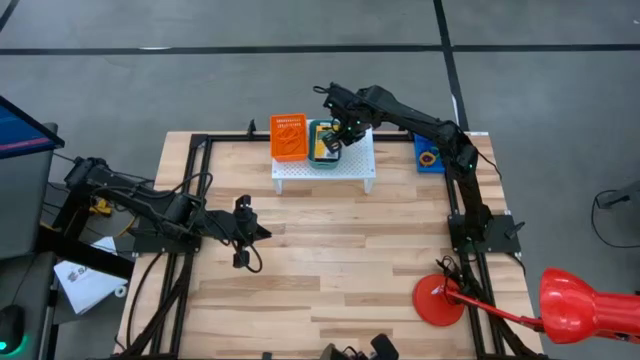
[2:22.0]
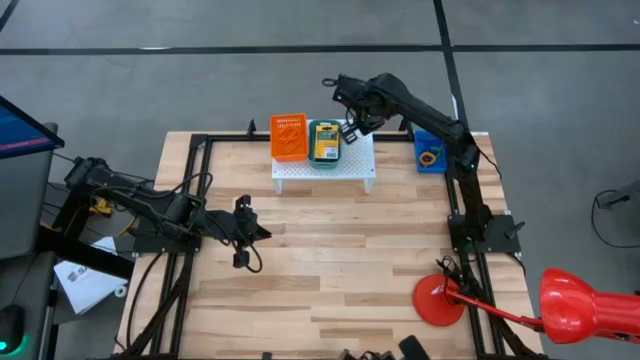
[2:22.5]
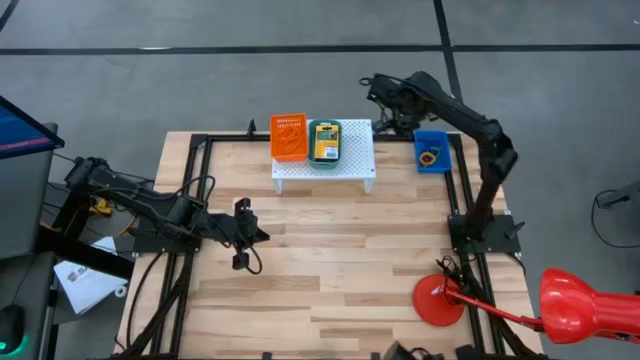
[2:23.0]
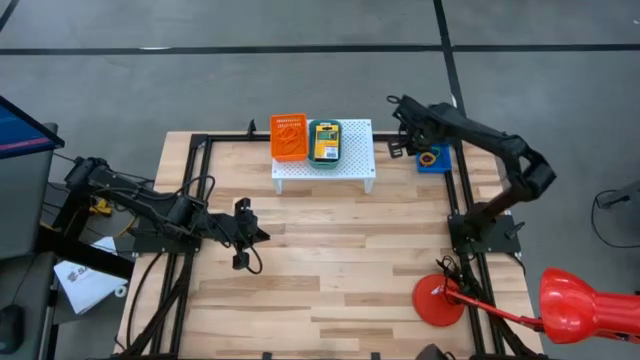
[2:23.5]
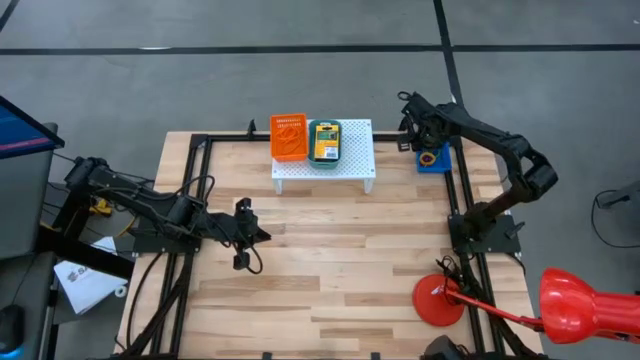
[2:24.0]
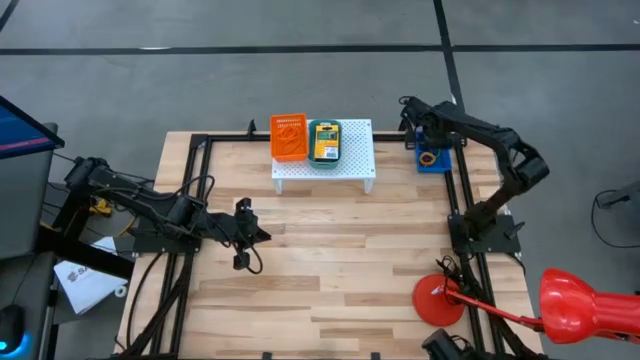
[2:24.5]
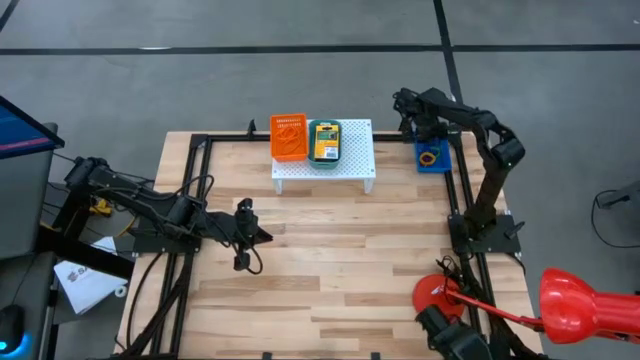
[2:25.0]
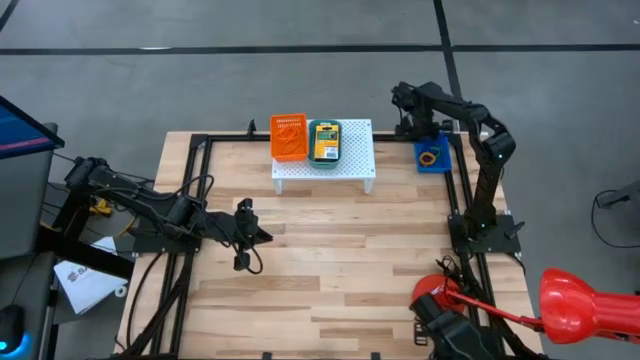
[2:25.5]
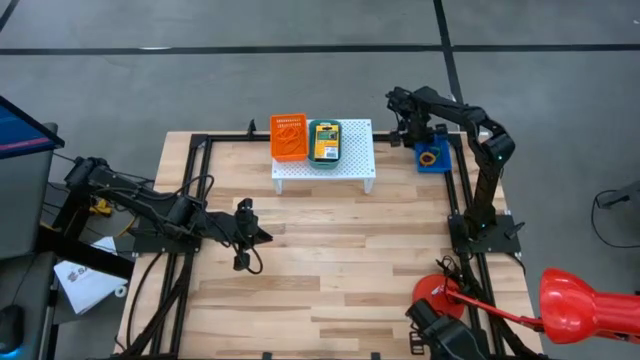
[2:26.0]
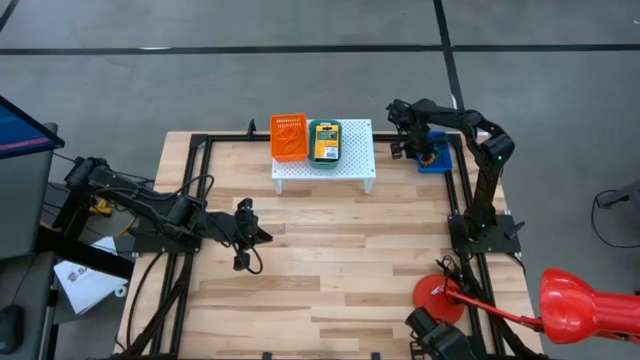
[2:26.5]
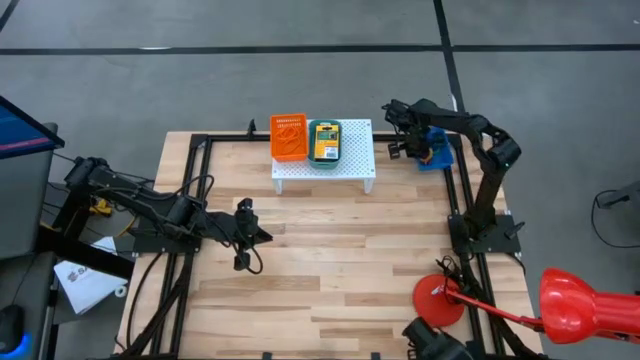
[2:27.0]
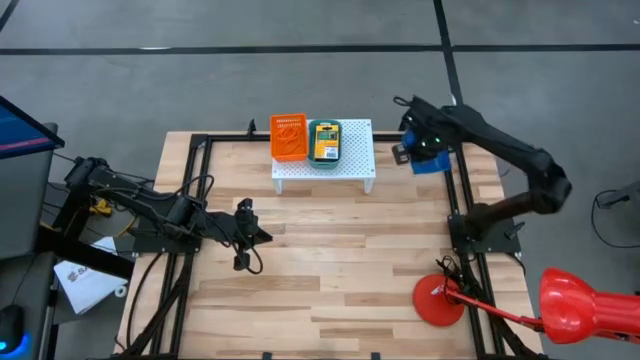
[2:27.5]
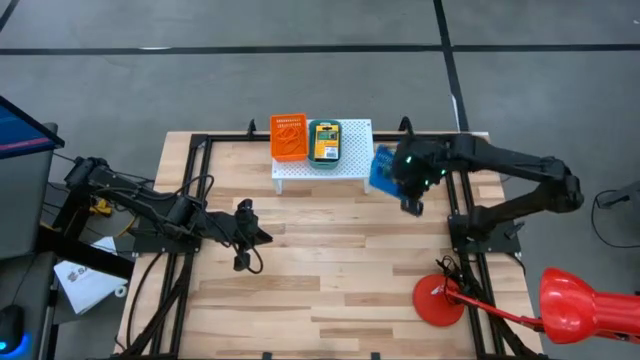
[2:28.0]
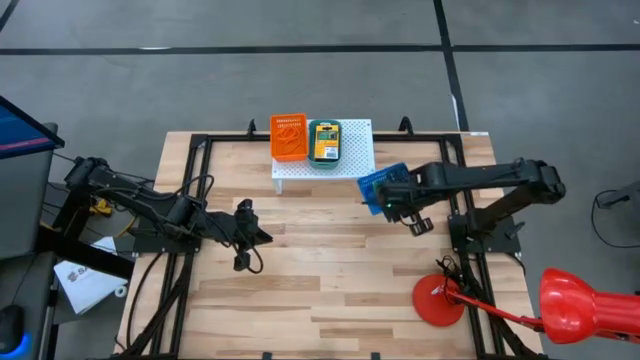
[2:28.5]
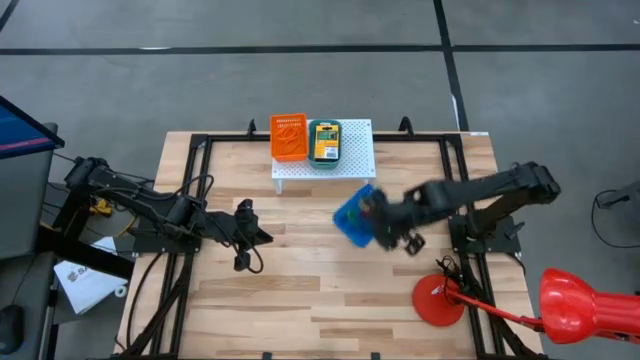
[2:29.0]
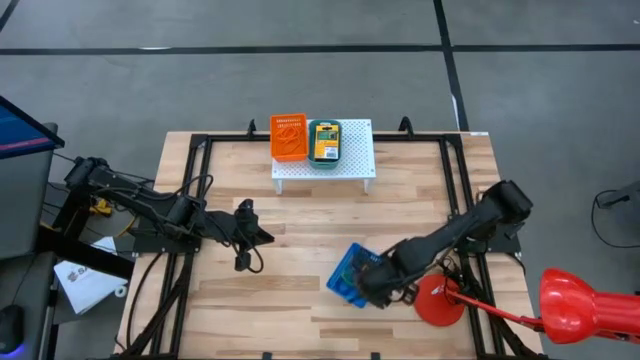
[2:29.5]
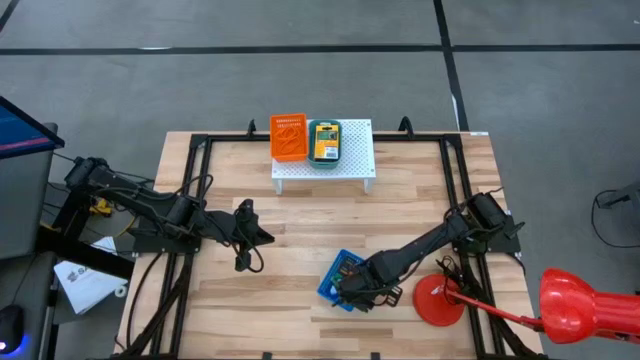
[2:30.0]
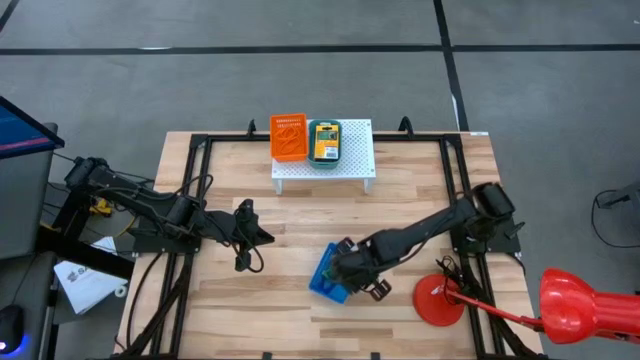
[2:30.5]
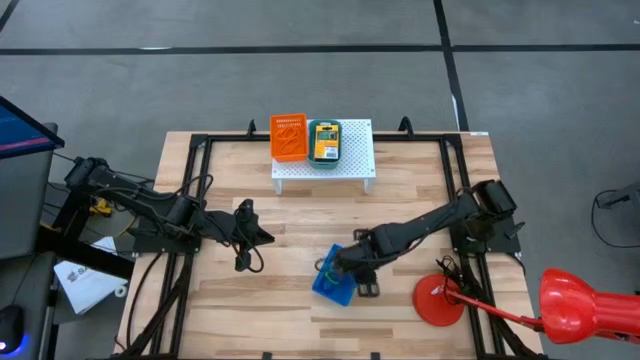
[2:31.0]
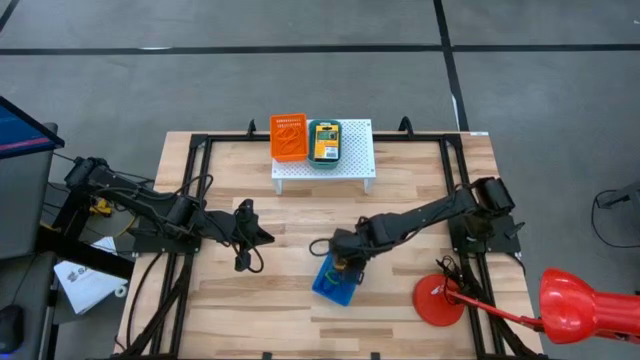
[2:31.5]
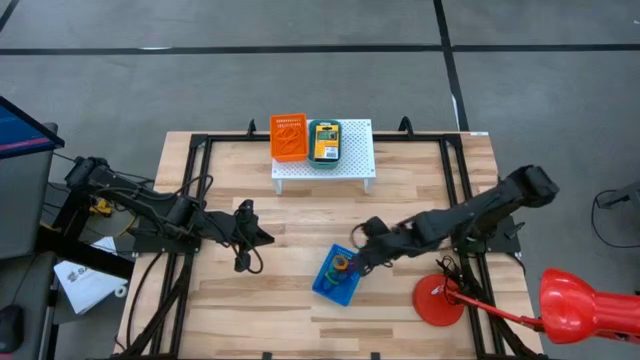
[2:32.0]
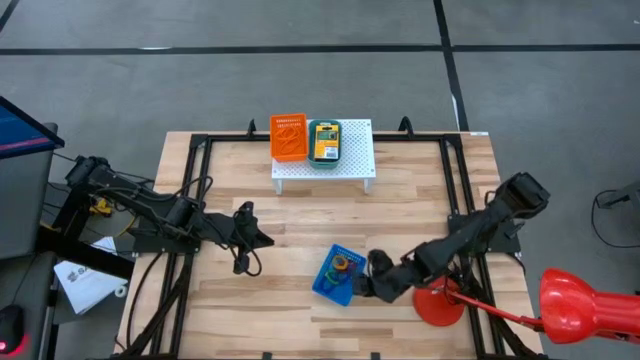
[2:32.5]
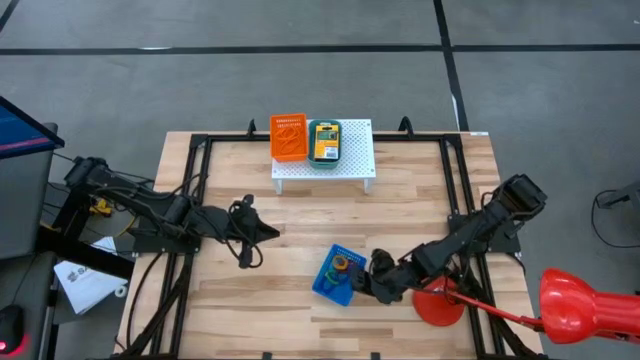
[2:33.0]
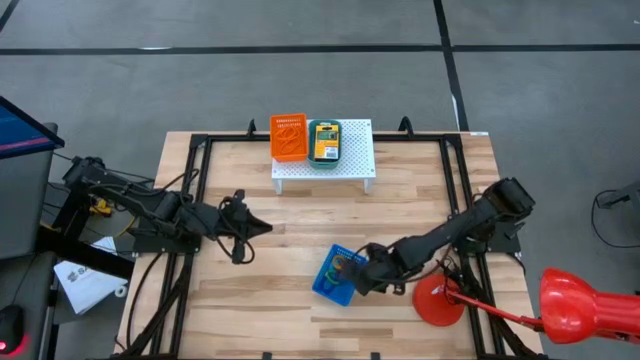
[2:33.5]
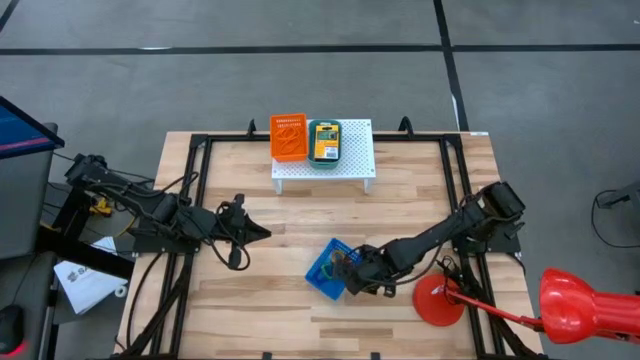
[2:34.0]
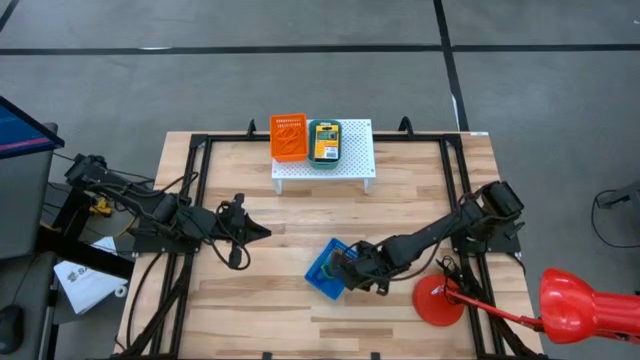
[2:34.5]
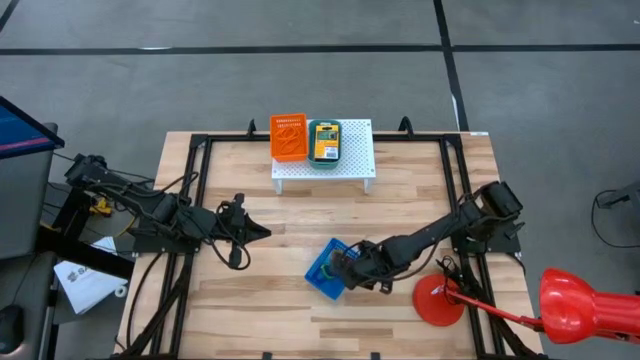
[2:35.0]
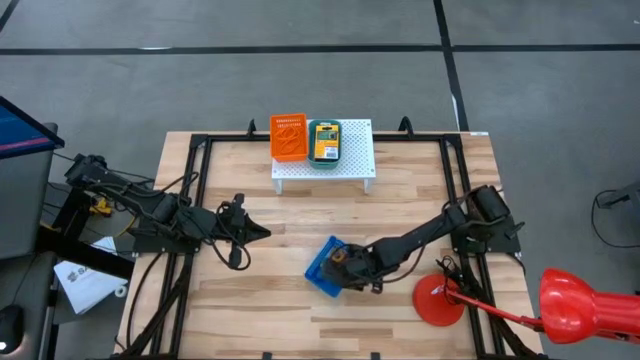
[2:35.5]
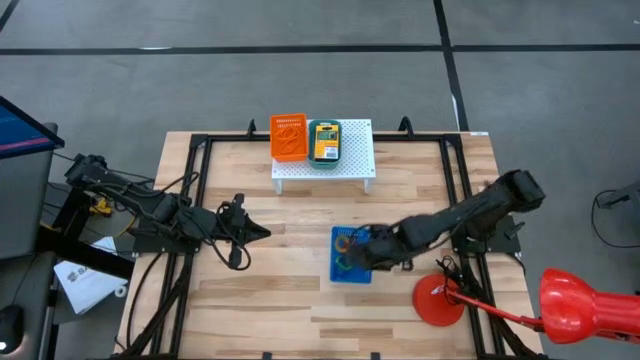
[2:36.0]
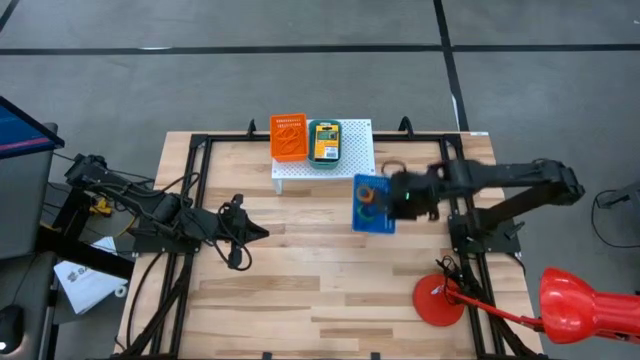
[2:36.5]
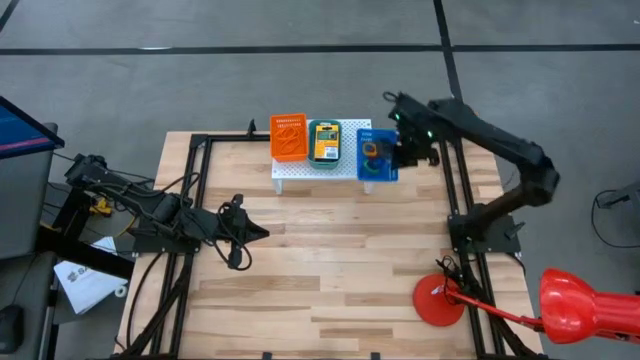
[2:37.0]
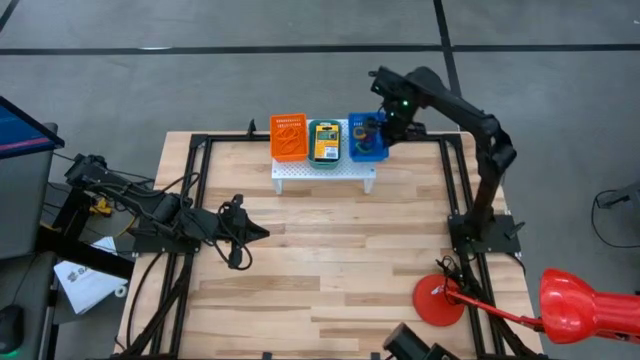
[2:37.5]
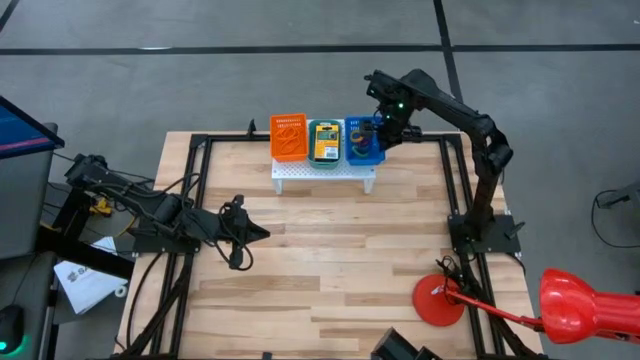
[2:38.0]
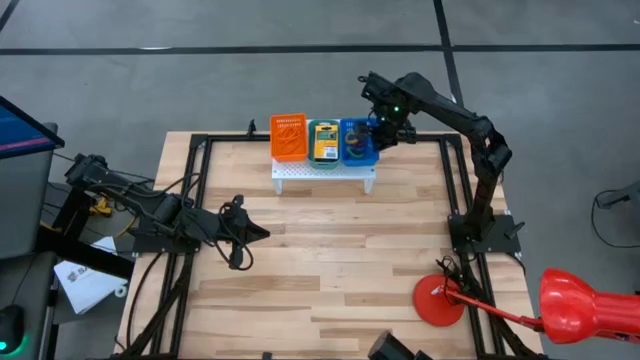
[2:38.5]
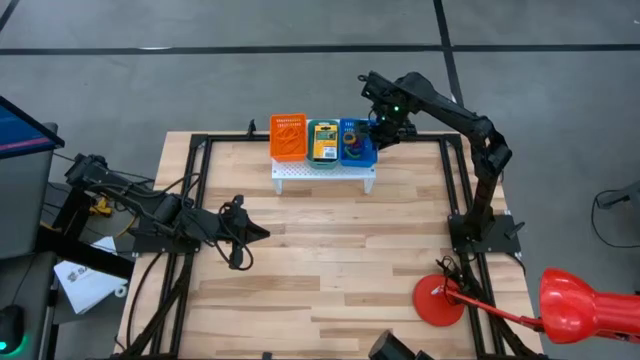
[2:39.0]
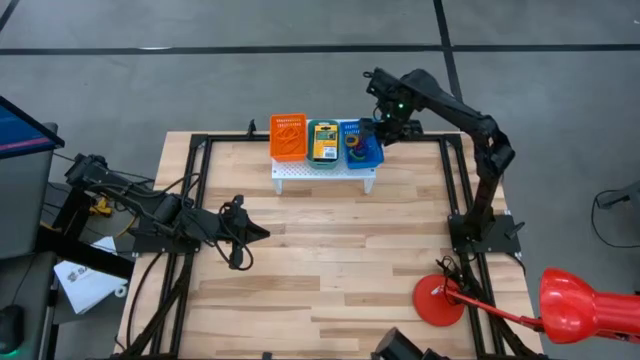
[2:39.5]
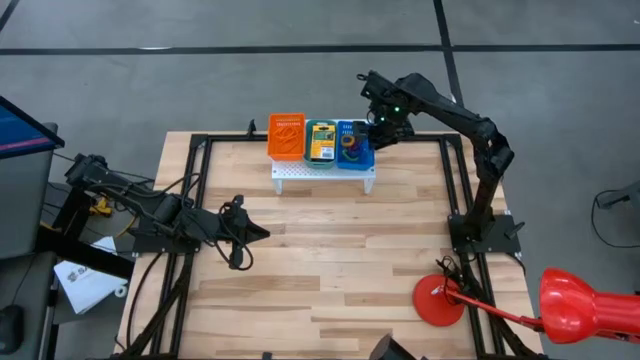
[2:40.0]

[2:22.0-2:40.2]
Task: Pick & Place Office Desk Supplies
Put the blue bin on the shelf
